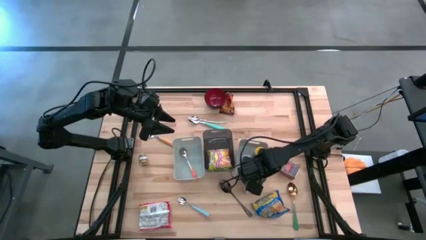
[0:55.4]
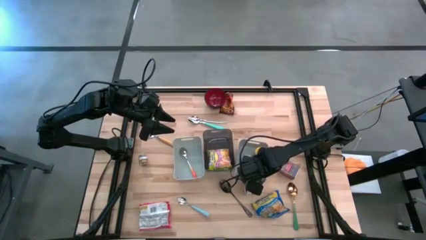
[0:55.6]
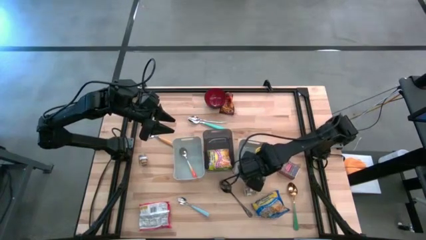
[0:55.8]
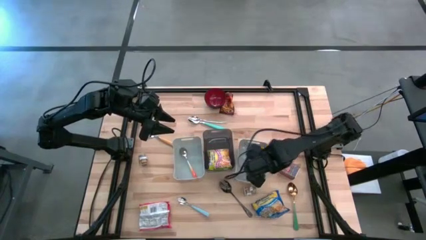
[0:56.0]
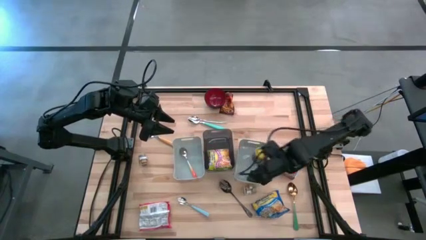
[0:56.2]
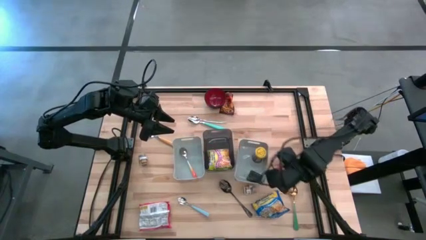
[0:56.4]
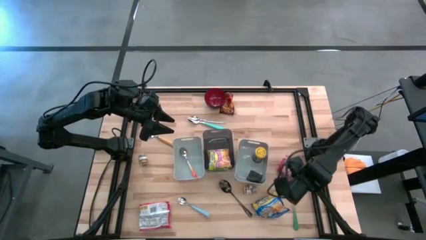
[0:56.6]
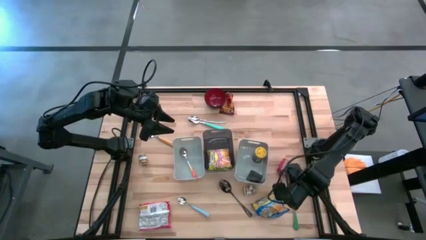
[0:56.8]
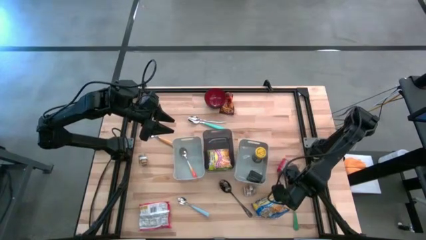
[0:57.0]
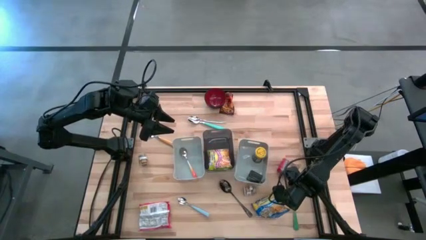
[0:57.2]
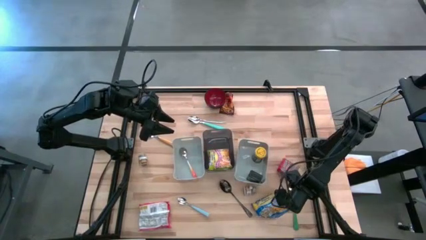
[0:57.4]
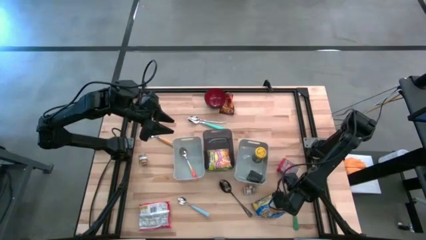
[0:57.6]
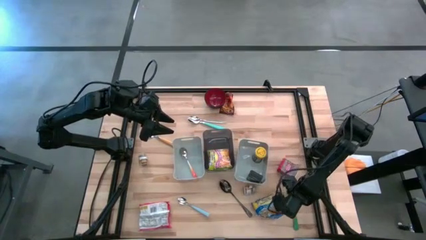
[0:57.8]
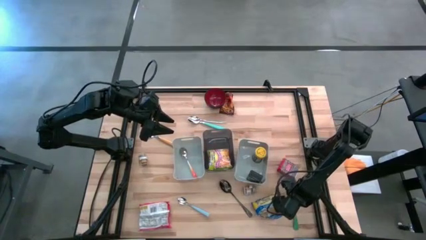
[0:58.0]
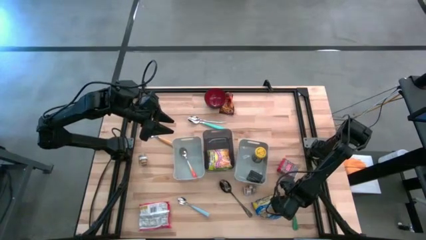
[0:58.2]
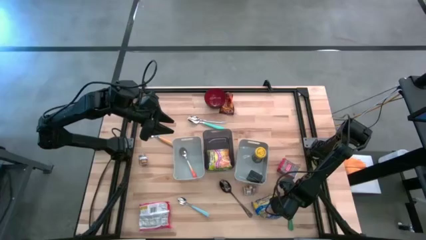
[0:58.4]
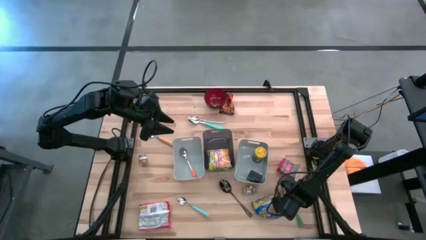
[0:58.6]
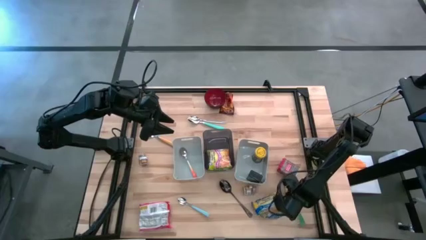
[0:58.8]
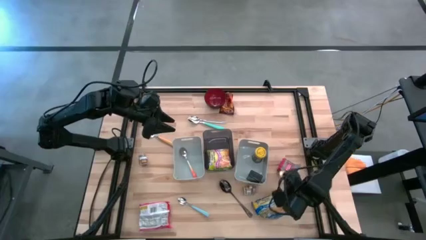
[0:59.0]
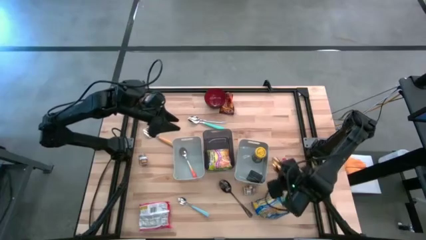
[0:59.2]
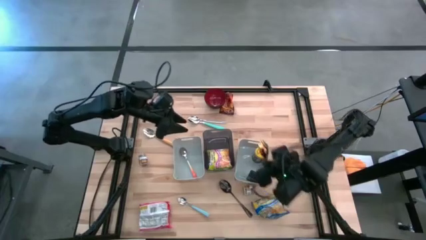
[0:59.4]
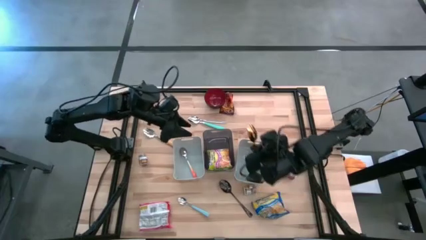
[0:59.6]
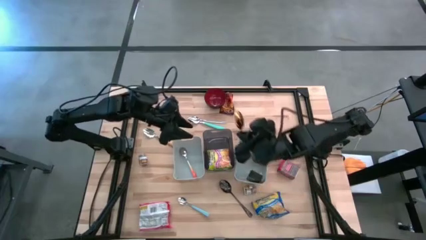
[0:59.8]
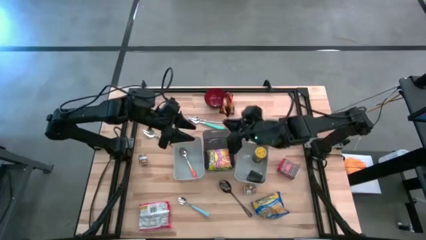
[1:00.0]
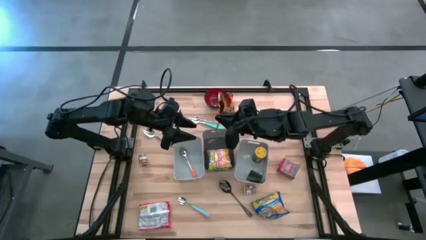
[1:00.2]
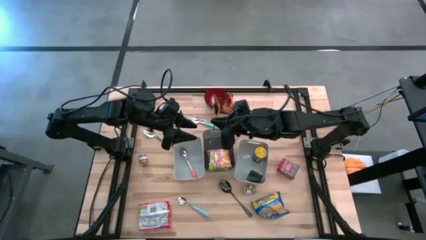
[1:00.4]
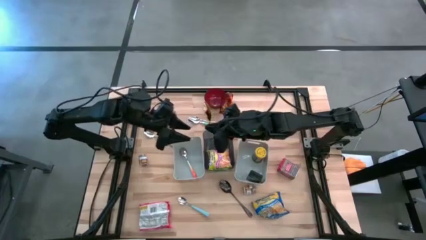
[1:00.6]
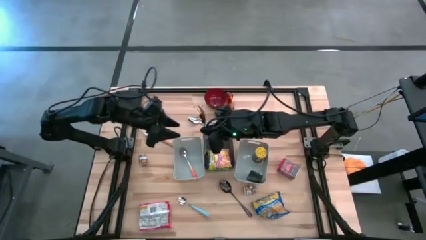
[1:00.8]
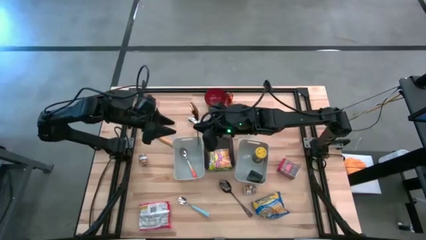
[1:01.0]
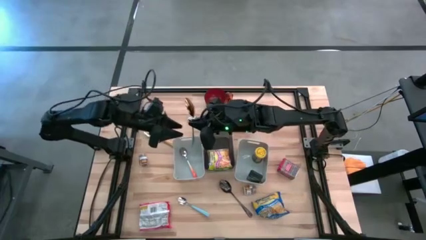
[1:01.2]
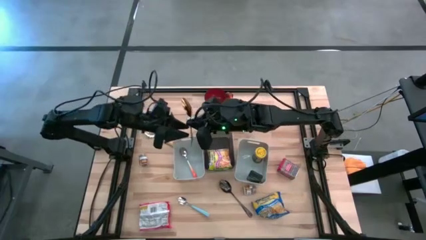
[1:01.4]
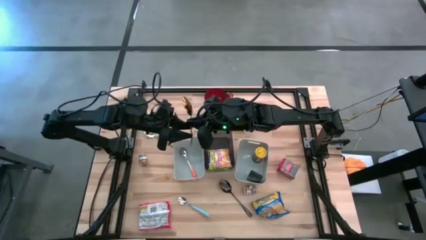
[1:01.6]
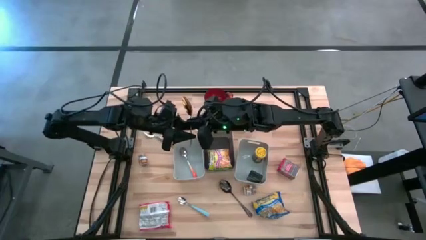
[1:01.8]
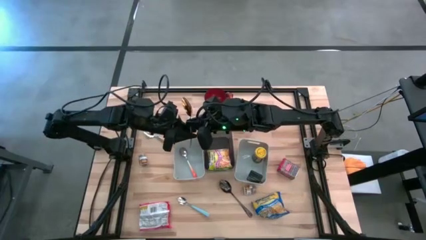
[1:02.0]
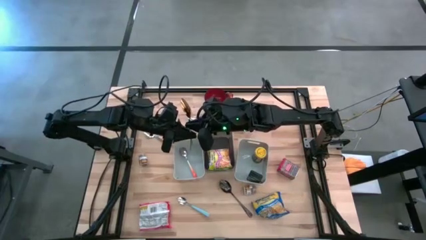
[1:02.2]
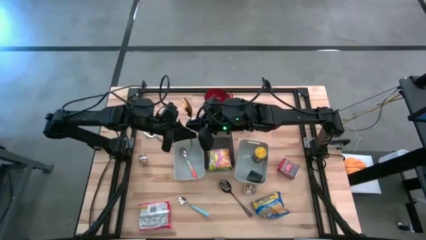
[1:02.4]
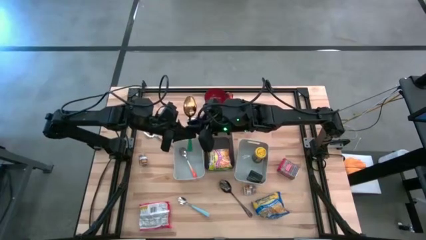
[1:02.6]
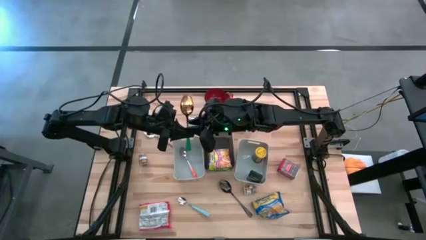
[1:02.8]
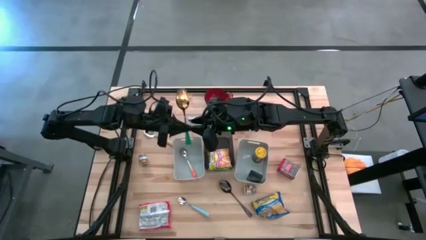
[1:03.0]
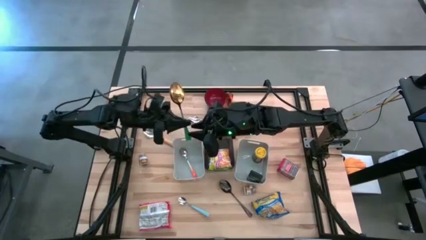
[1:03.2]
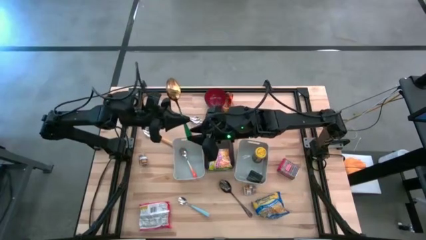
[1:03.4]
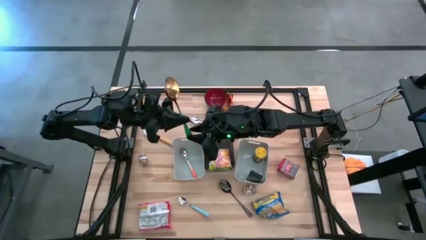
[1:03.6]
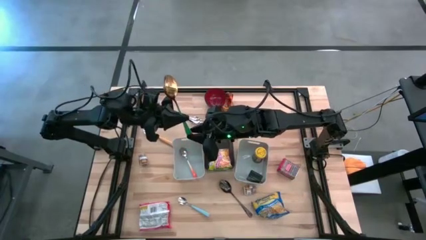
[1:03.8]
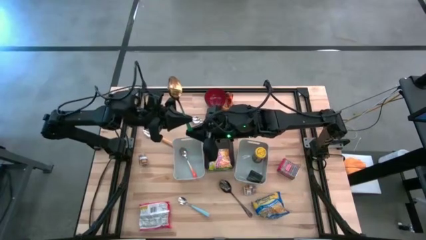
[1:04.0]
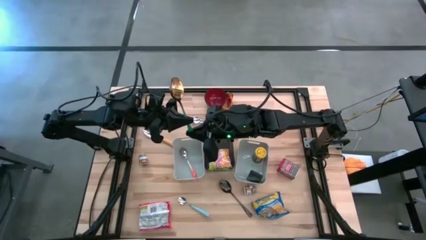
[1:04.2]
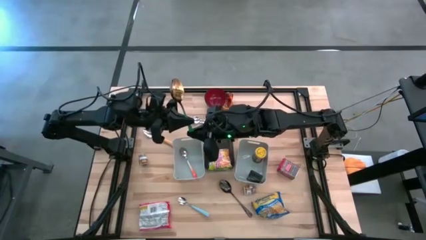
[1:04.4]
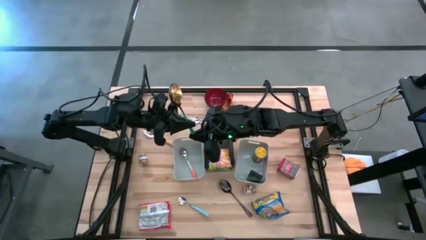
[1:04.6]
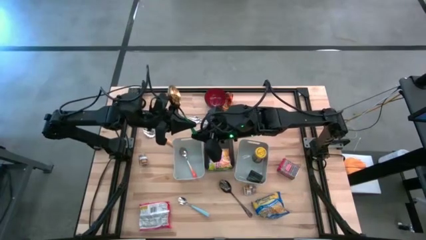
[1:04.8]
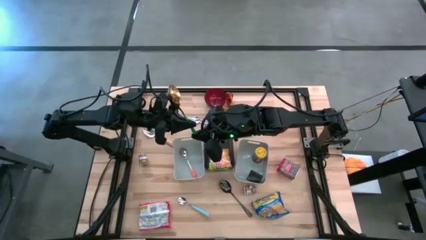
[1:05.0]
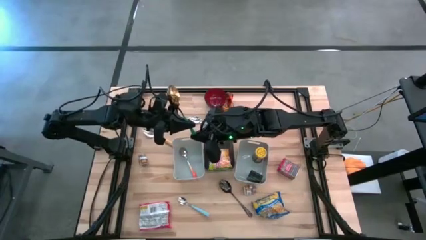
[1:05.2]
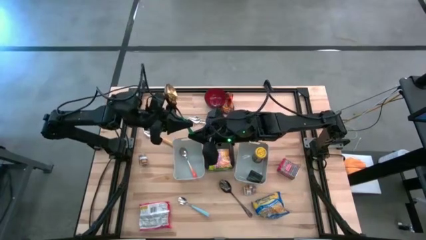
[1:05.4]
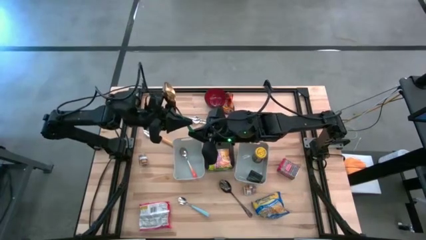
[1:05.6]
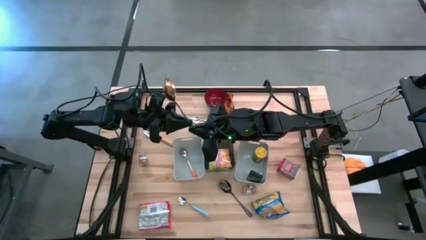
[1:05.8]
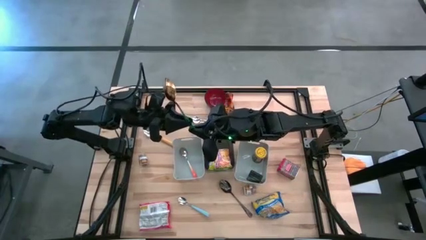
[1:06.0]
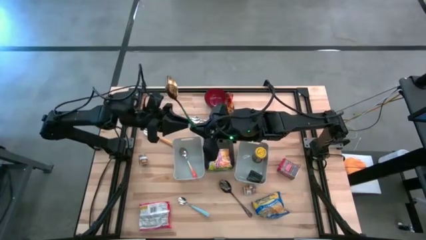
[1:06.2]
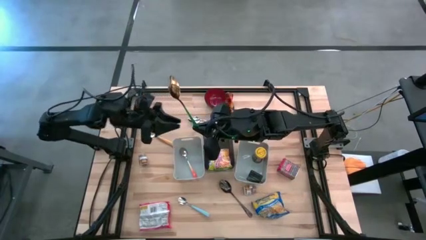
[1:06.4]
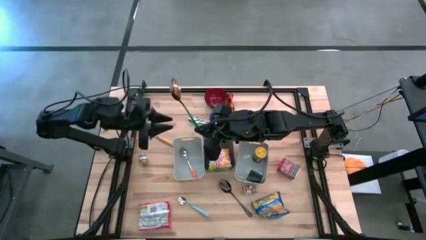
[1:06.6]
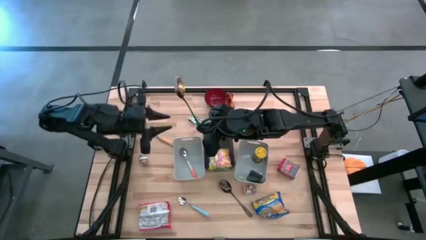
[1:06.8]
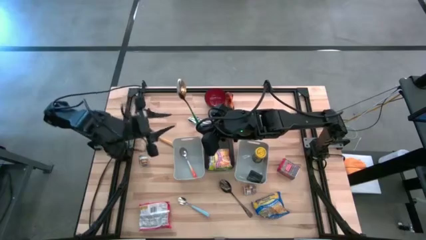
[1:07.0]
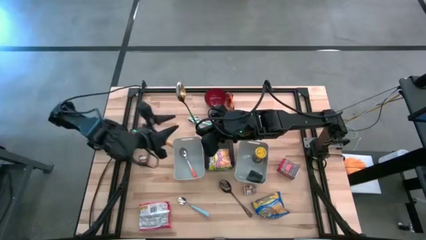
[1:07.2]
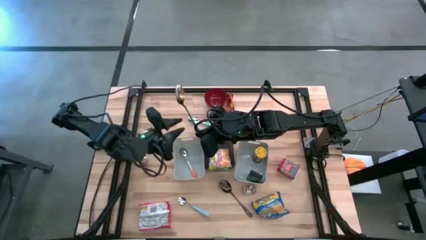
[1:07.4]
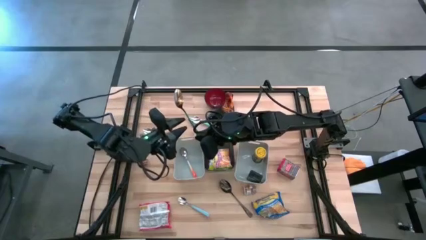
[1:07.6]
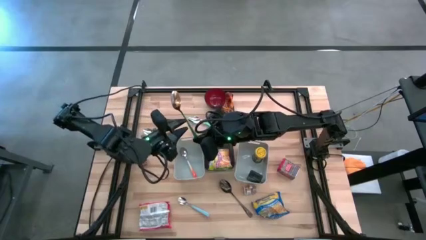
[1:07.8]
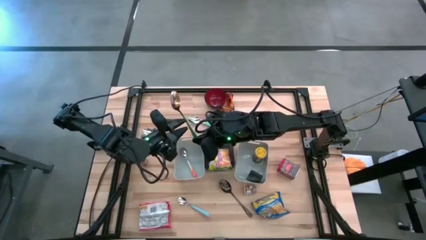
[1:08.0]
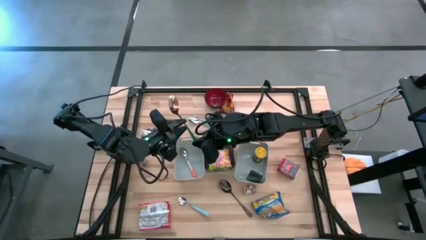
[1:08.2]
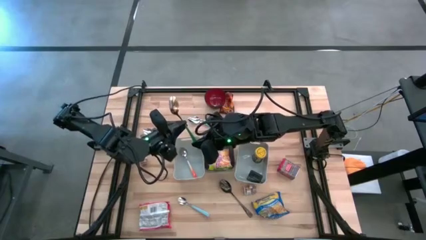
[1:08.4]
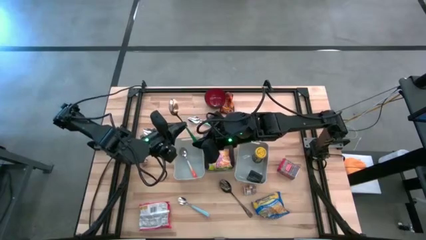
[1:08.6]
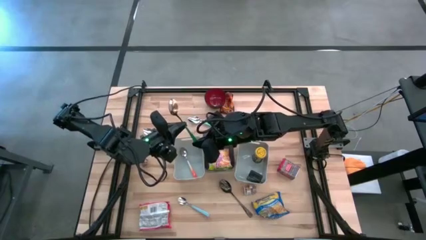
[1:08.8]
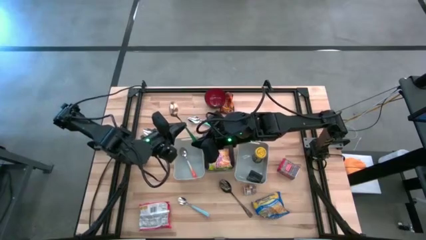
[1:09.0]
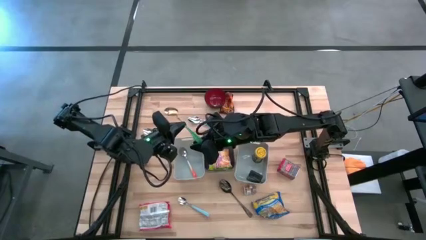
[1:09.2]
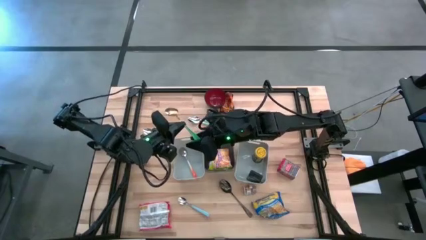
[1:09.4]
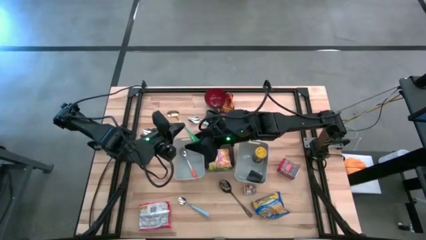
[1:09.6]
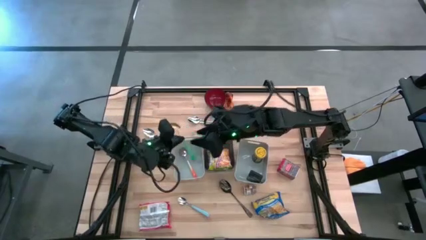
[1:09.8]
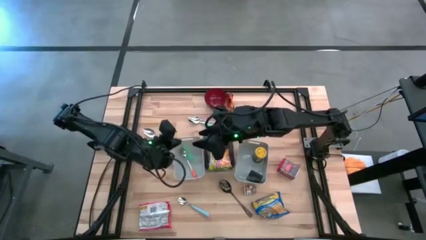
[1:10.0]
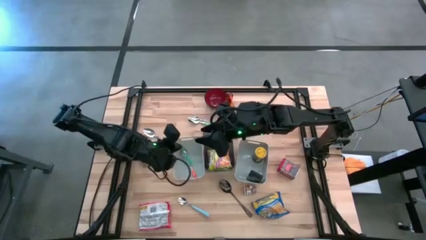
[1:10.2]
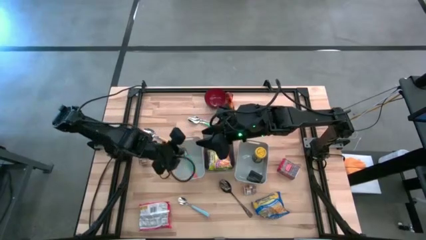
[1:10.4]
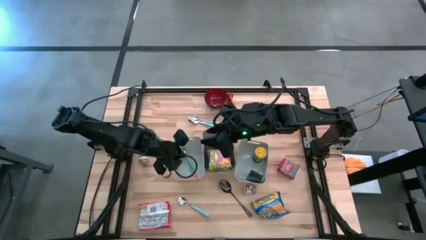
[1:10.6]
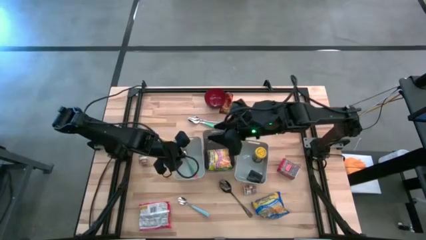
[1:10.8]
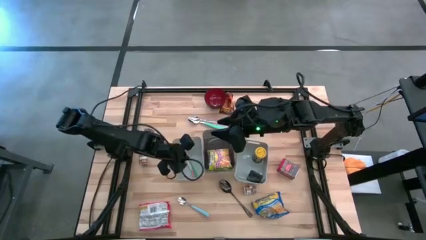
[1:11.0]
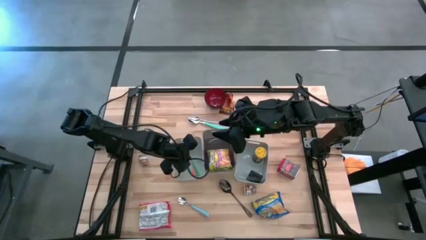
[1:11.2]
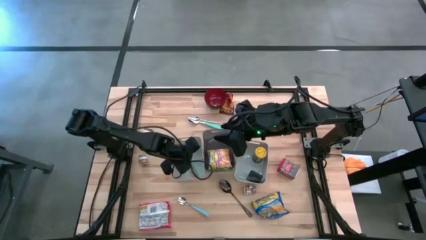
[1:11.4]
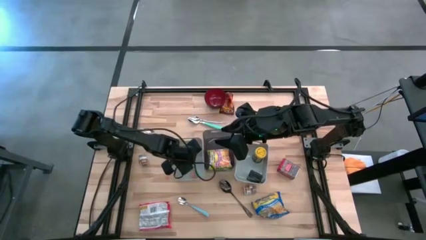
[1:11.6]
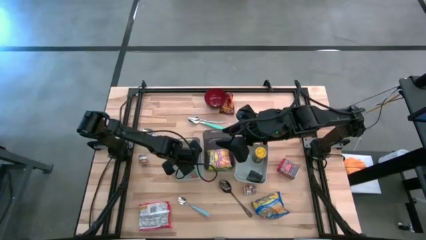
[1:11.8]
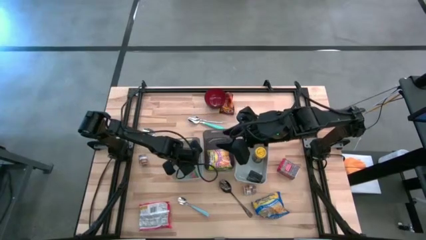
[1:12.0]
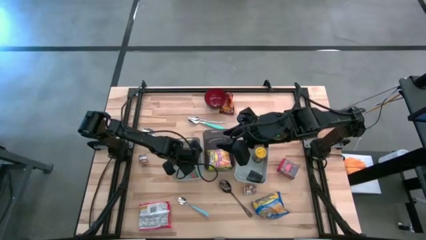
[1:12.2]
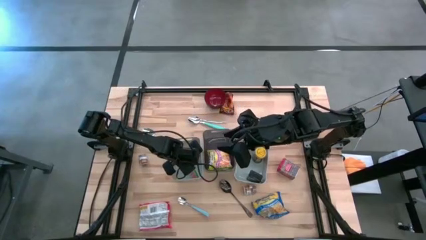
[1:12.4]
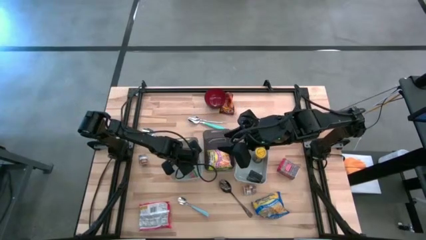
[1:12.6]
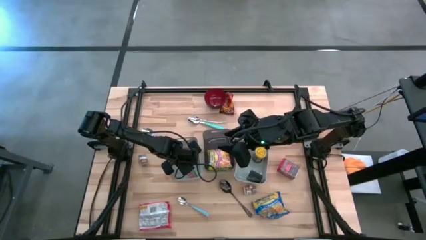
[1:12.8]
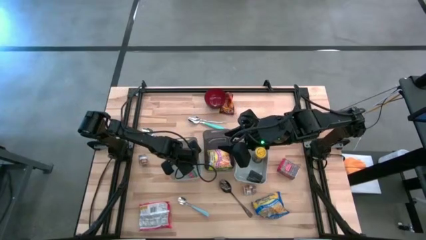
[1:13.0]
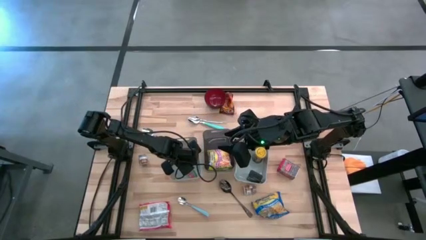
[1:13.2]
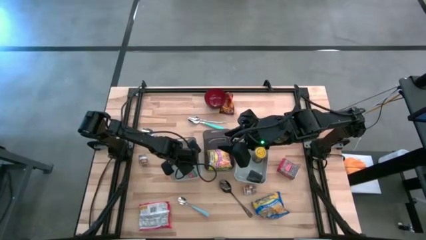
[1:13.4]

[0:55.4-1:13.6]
Put the green spoon into the left gray bin
